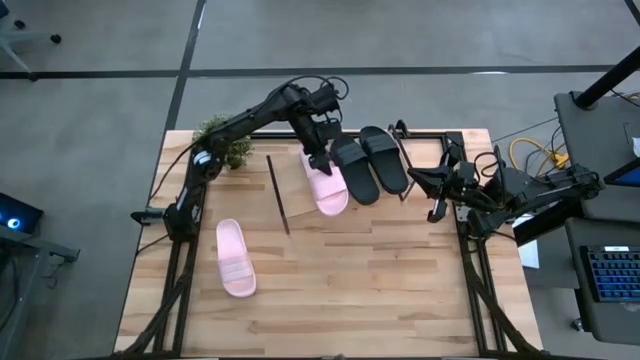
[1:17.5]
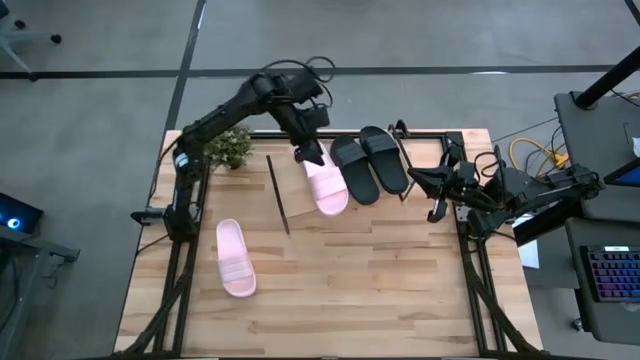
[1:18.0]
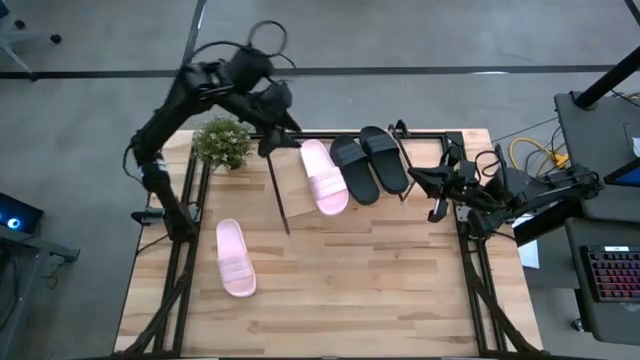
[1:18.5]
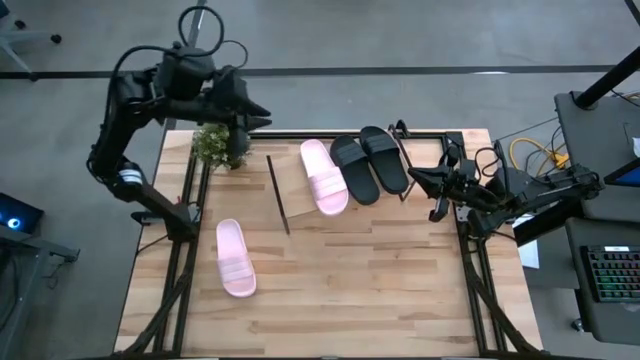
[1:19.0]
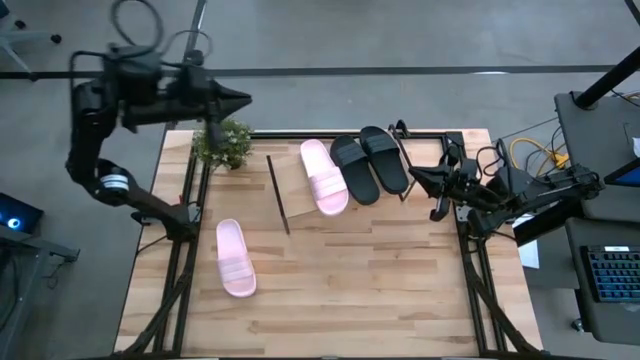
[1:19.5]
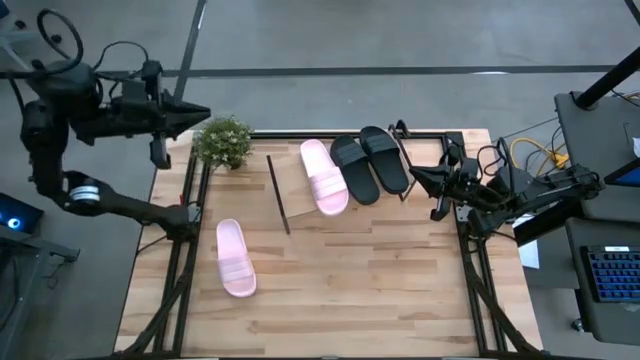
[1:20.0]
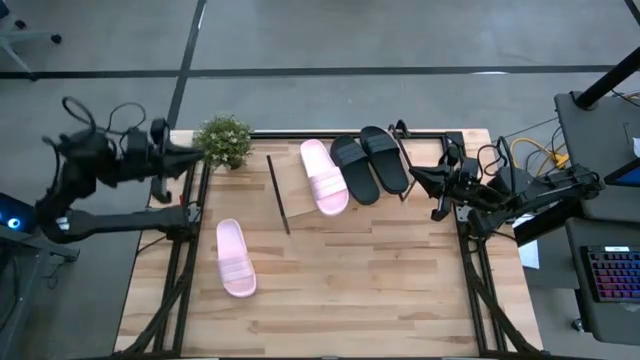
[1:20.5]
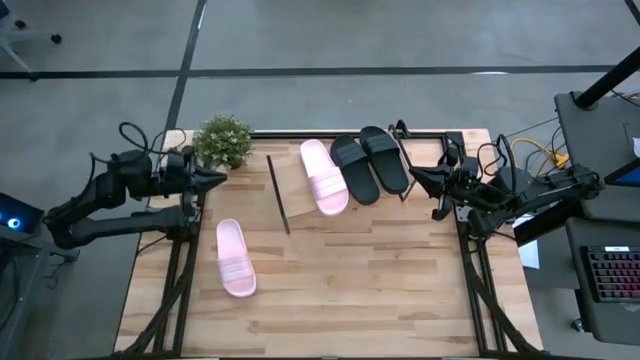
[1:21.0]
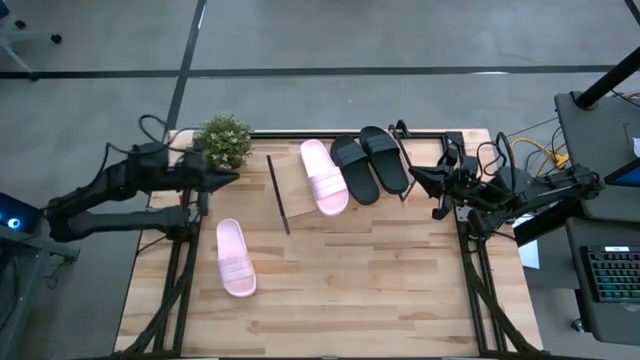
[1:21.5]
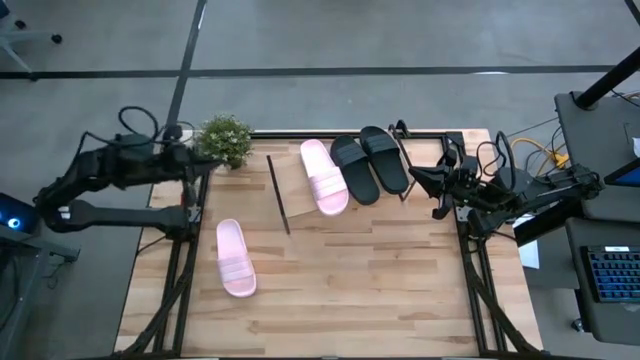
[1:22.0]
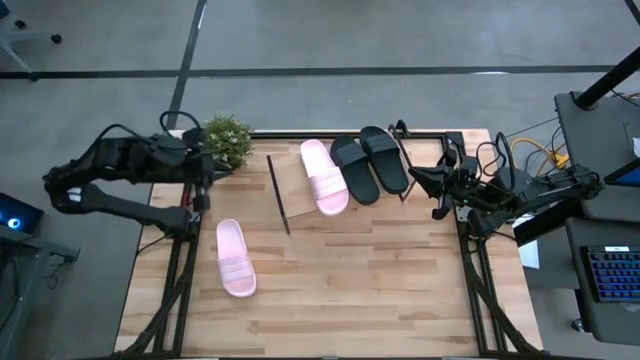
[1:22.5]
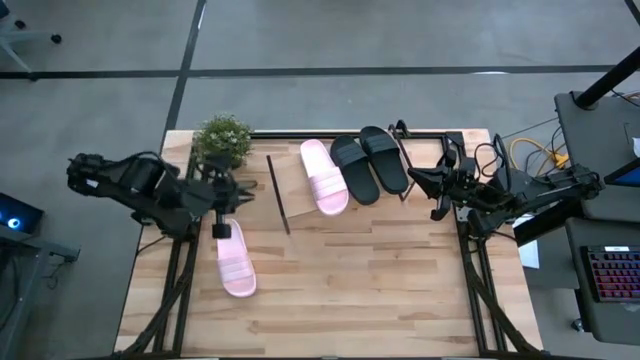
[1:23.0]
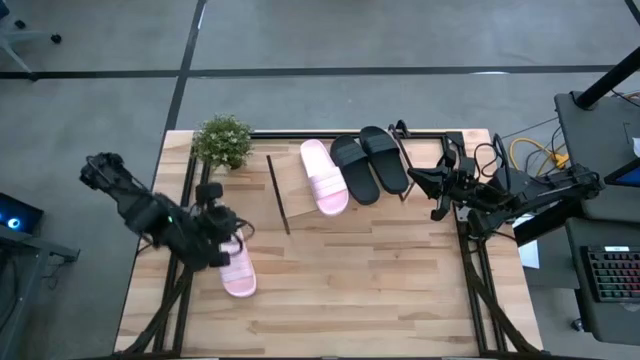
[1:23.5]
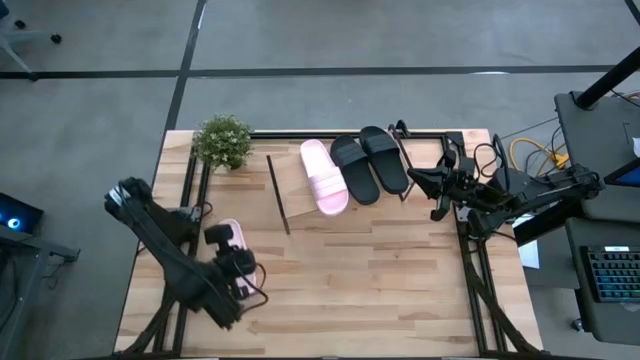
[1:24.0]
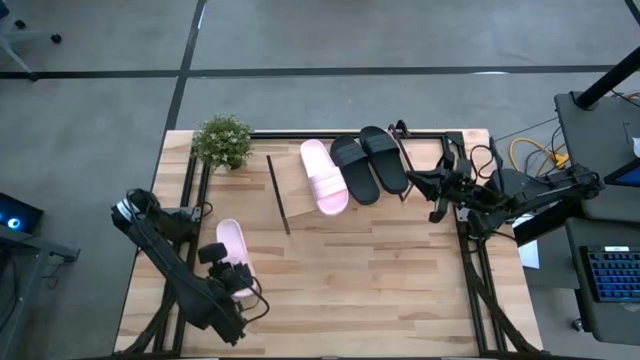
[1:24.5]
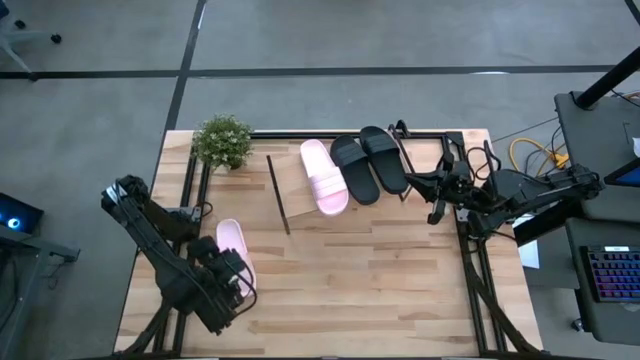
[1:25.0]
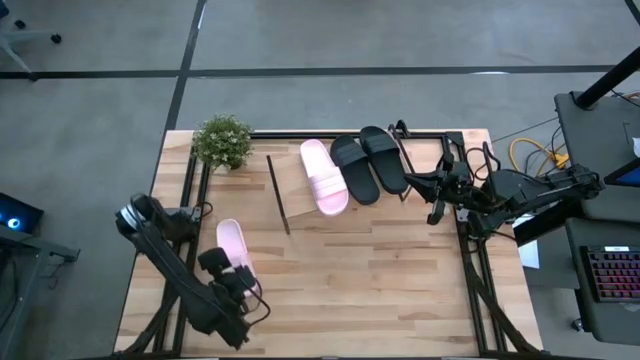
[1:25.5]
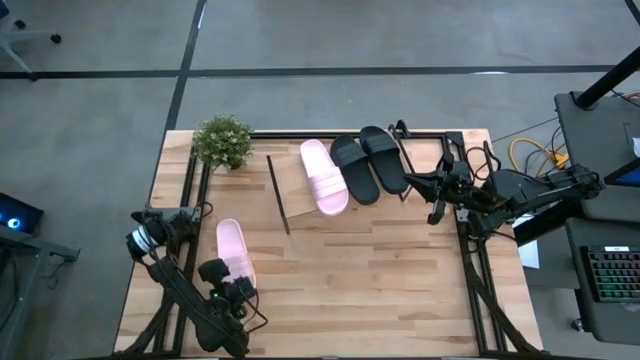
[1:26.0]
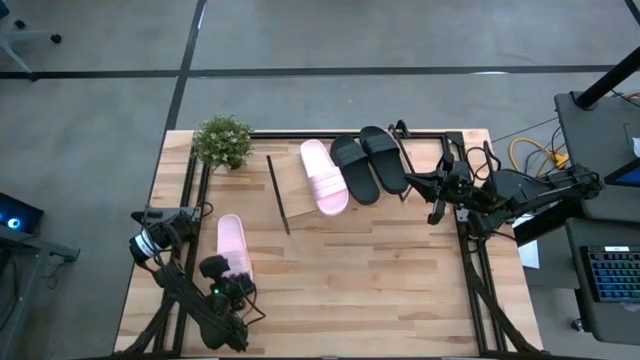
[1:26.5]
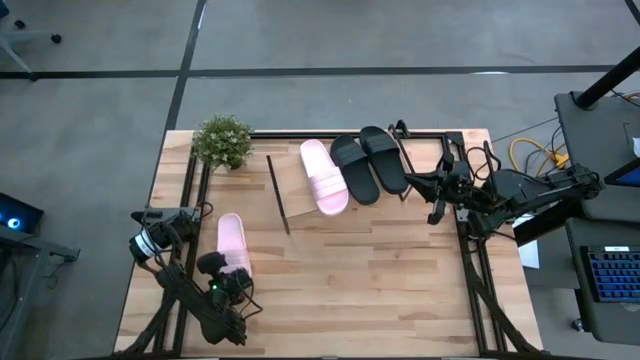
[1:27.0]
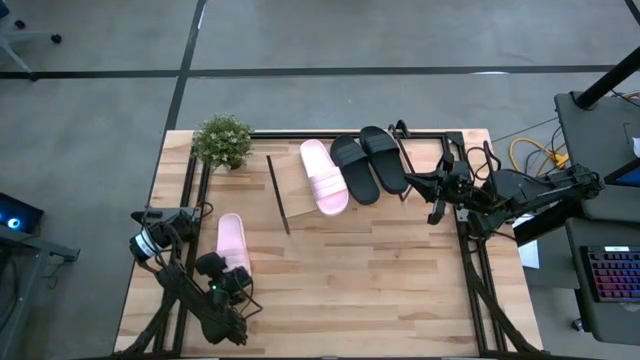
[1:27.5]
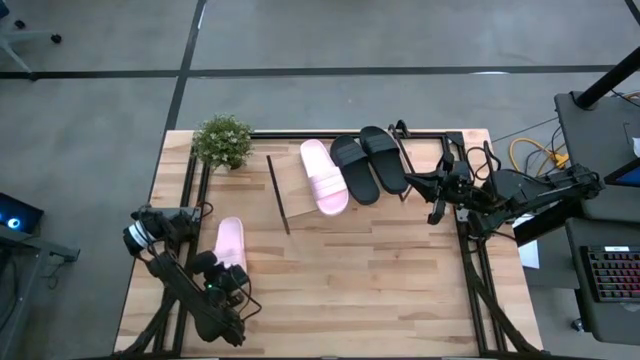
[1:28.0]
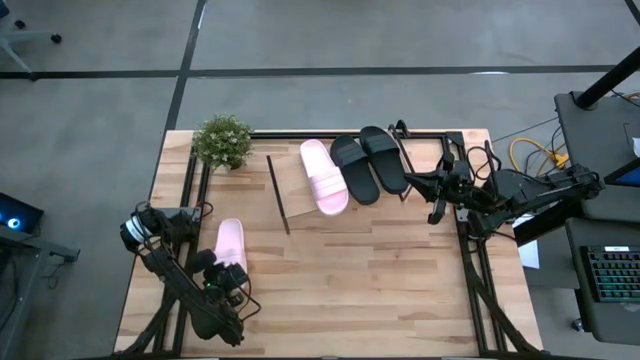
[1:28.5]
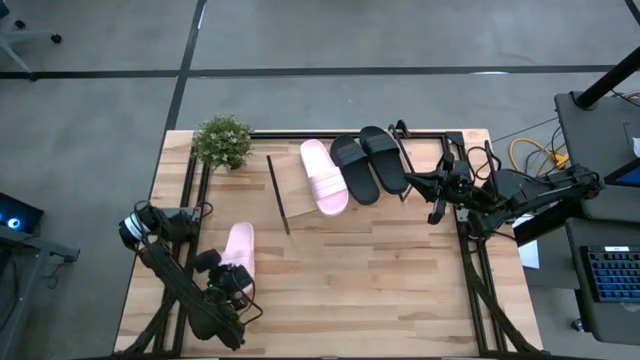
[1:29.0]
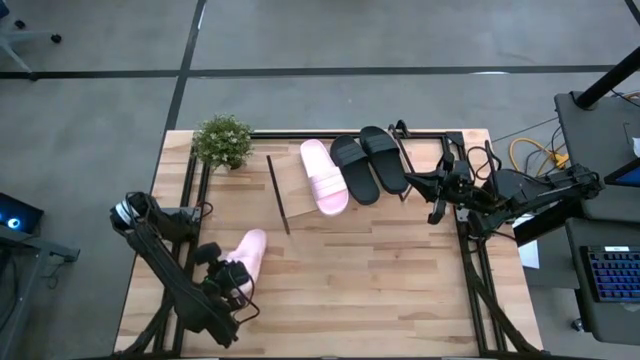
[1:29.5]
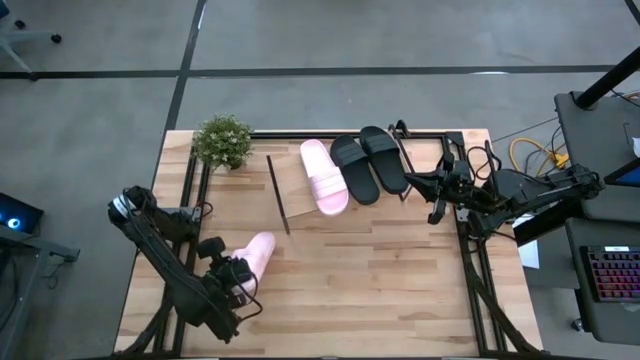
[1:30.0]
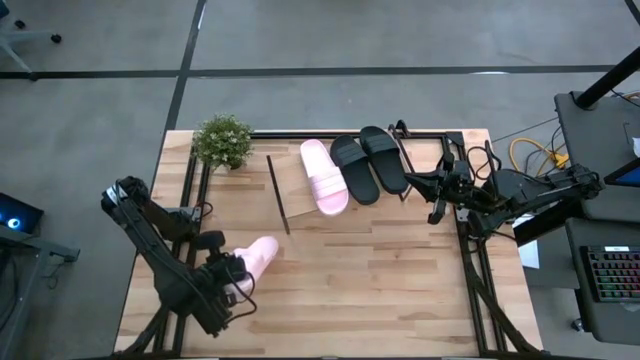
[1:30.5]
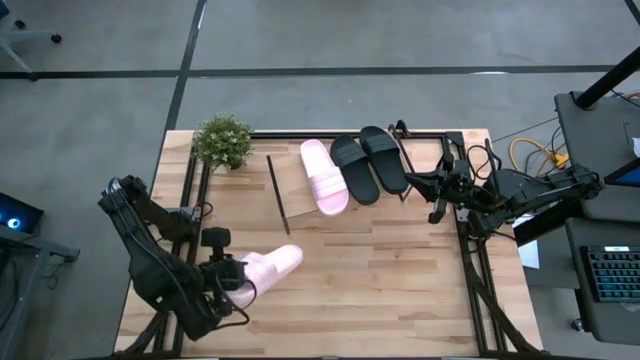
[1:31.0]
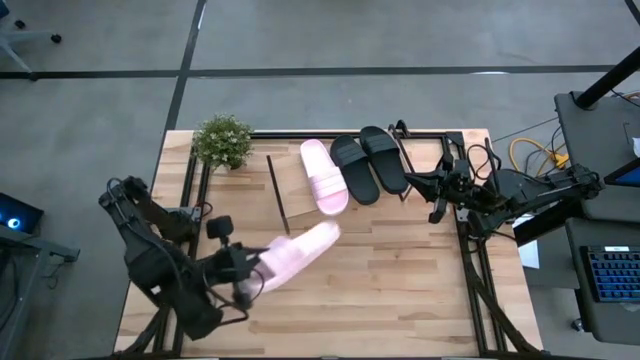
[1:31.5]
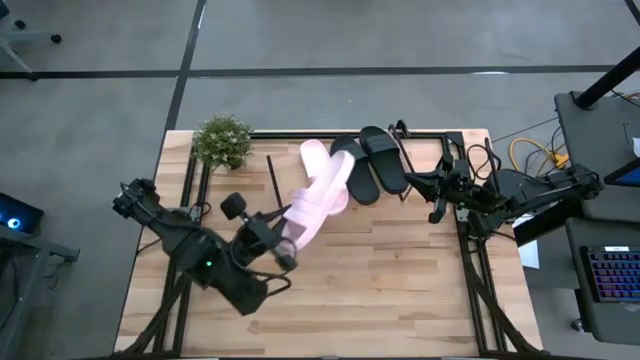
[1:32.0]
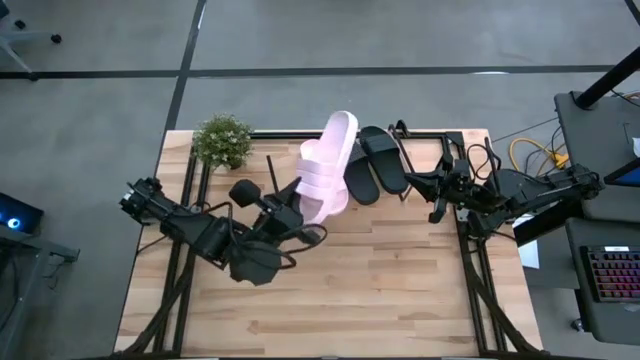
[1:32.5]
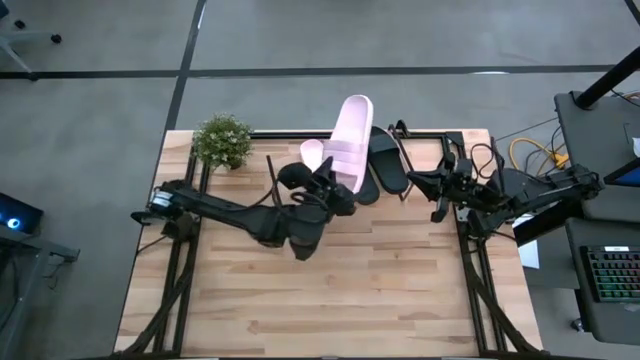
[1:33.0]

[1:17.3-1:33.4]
Task: Pick and place slides into the shelf
Put the pink slipper on the shelf

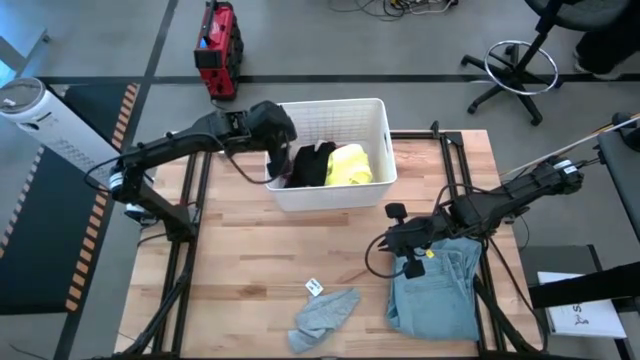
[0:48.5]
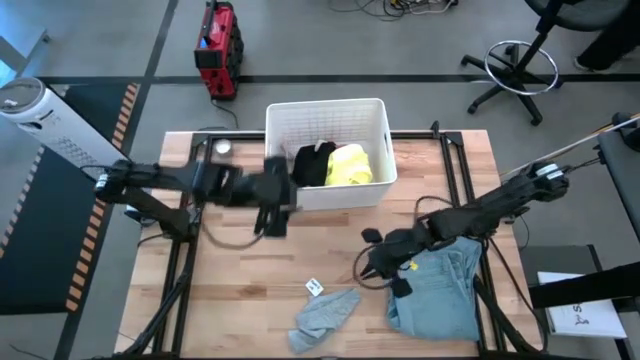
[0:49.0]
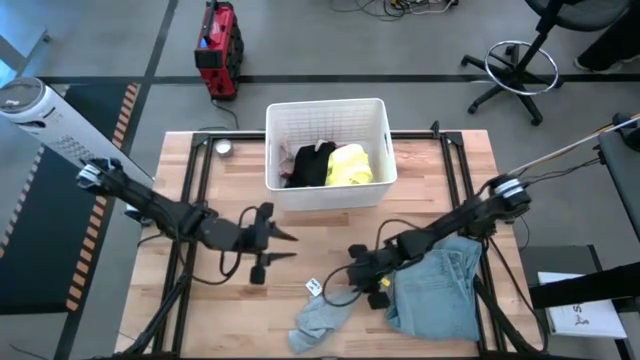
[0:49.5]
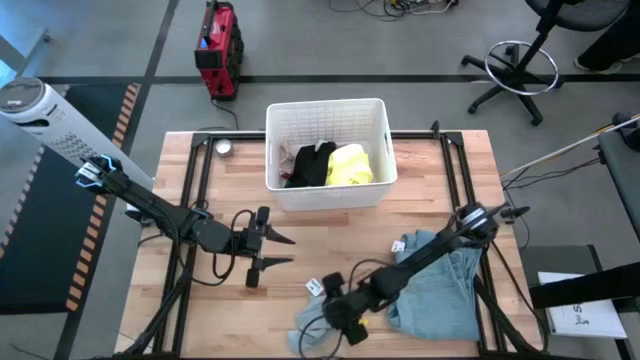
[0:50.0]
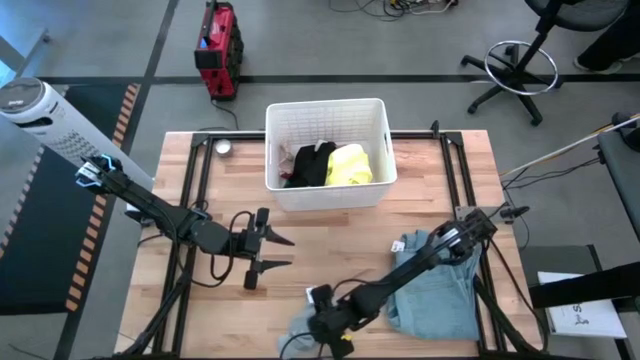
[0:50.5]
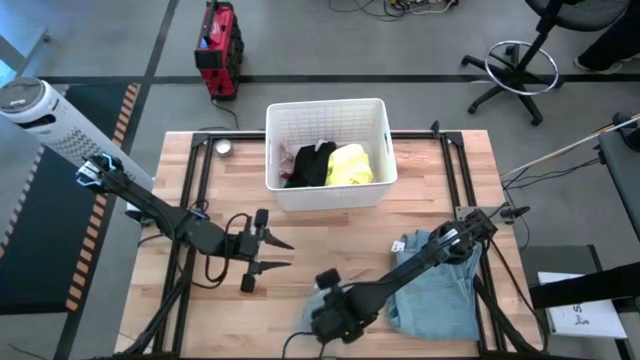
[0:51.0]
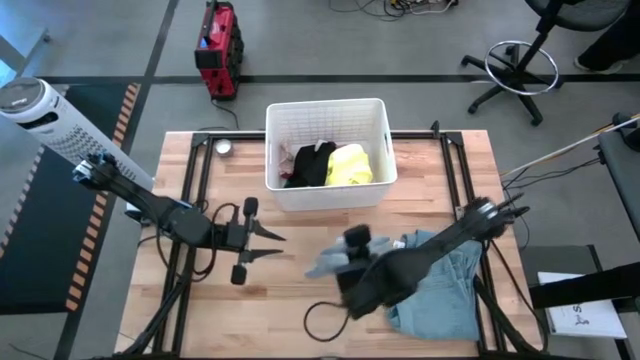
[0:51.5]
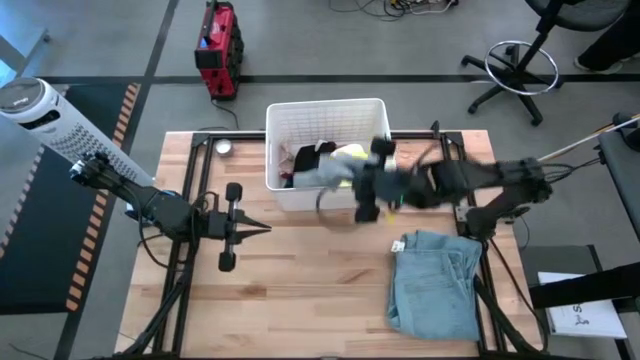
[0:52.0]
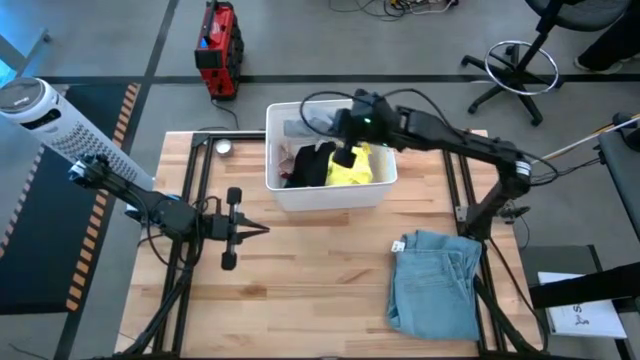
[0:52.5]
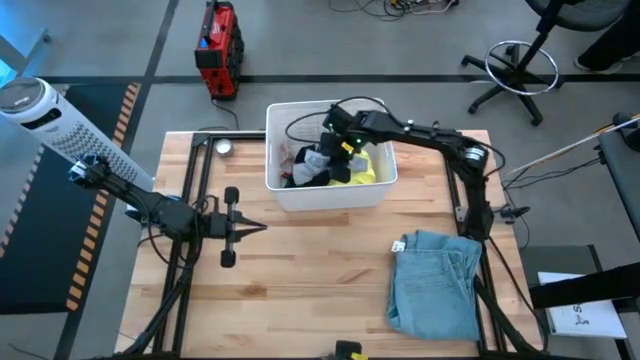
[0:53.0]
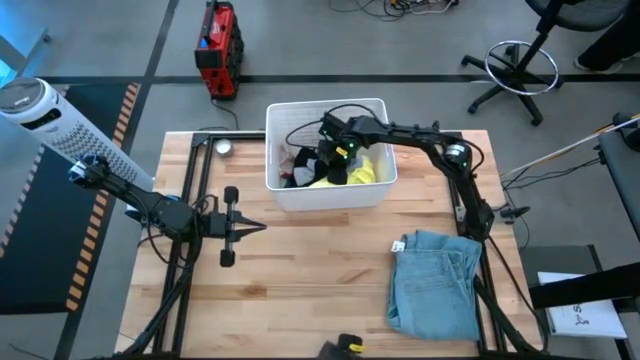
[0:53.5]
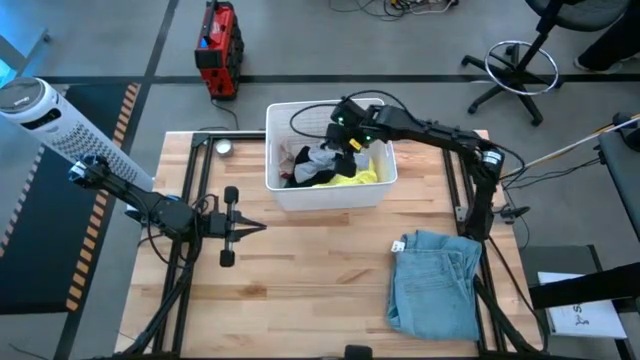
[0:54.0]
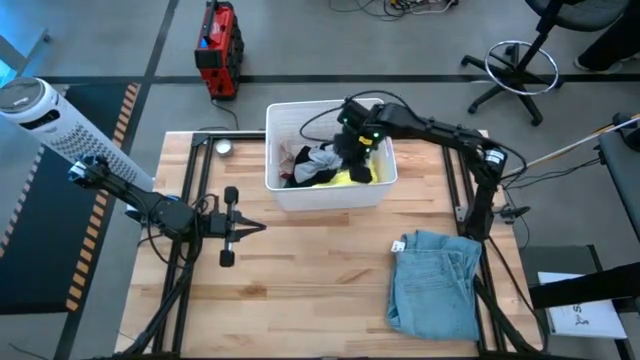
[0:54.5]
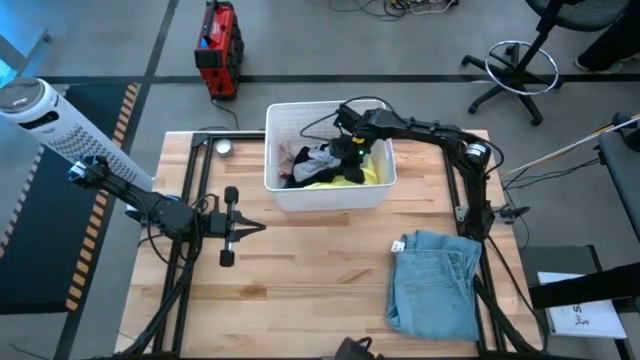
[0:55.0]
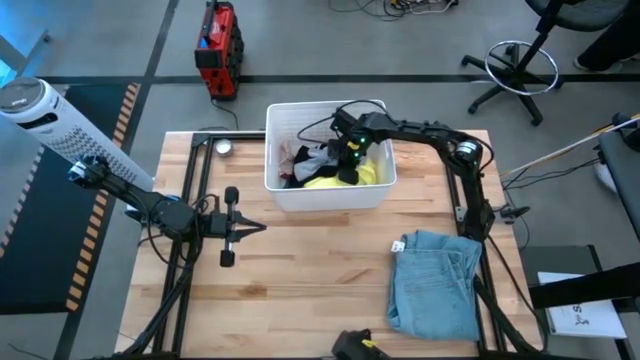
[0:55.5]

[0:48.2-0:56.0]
Task: Sort clothes
Put the gray boxer into the white laundry bin
